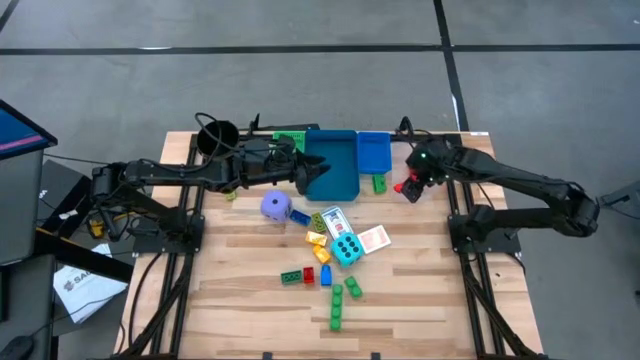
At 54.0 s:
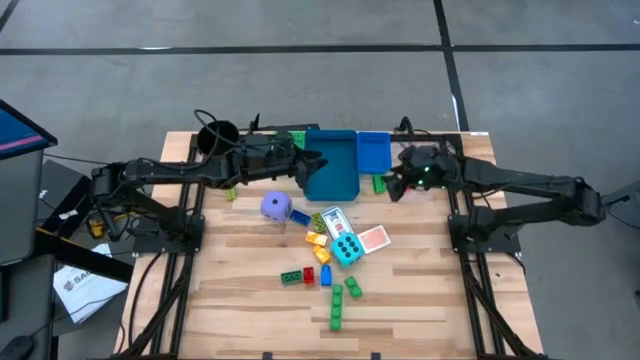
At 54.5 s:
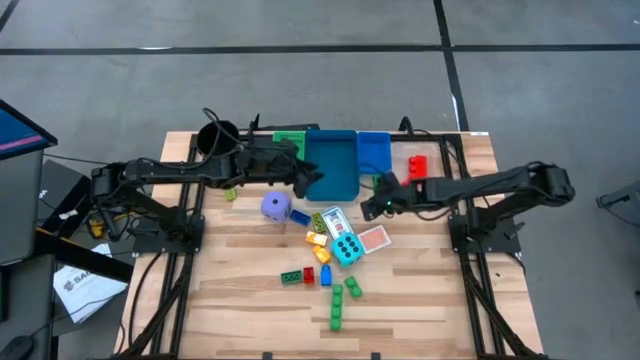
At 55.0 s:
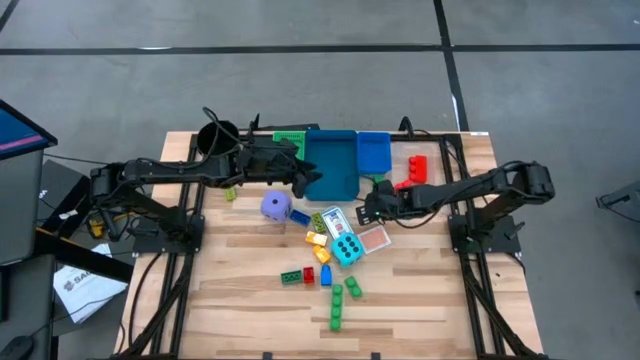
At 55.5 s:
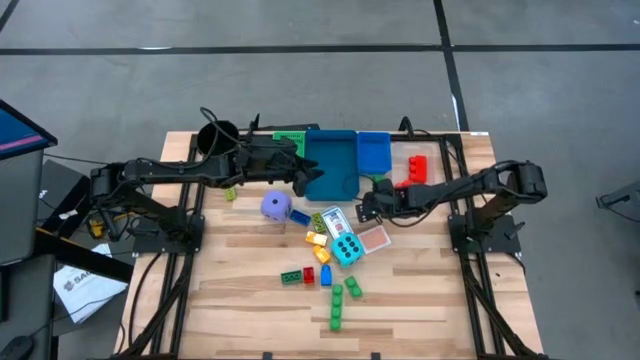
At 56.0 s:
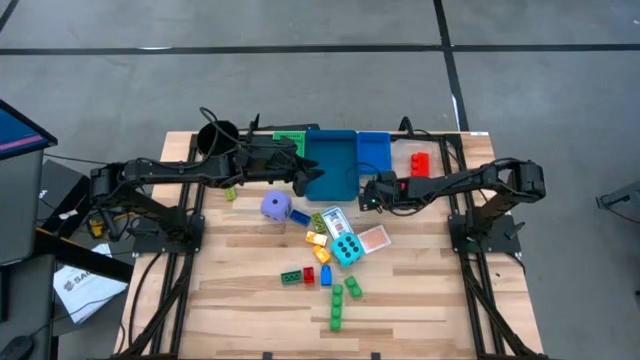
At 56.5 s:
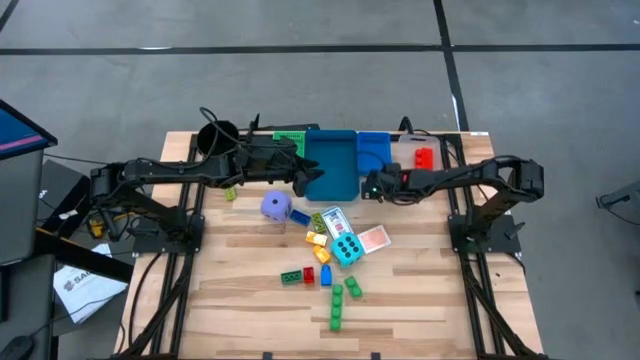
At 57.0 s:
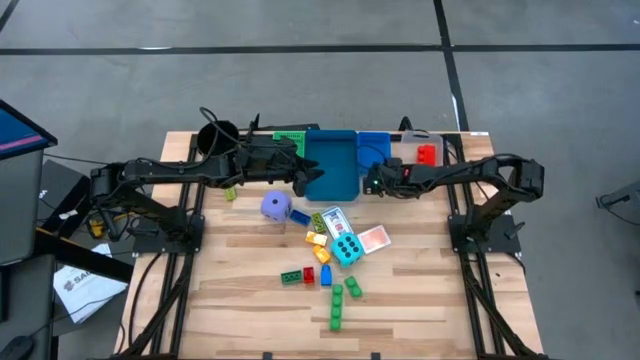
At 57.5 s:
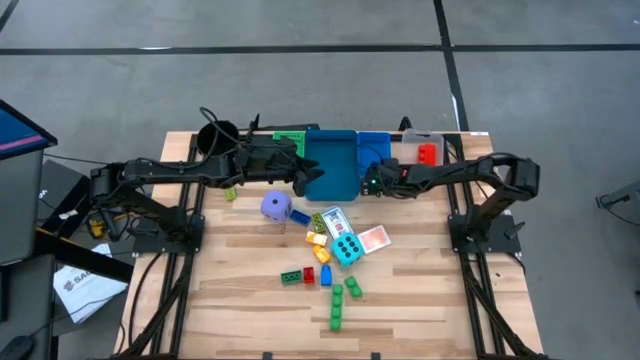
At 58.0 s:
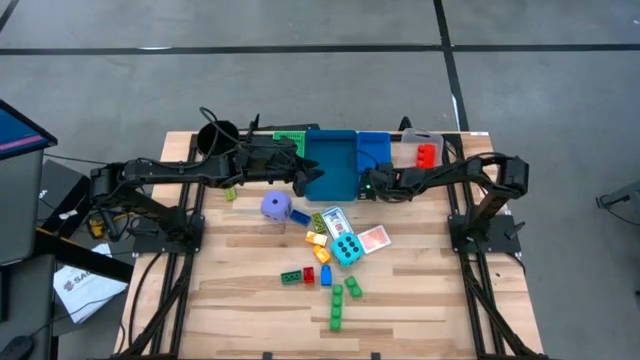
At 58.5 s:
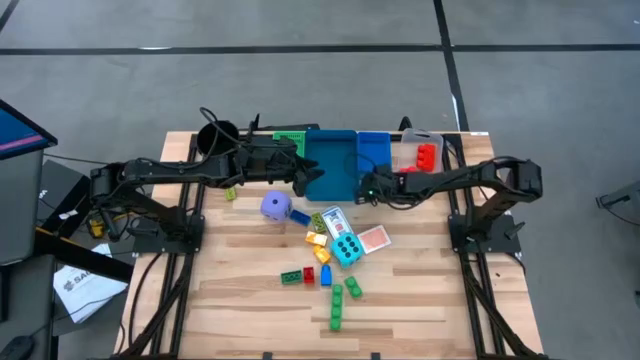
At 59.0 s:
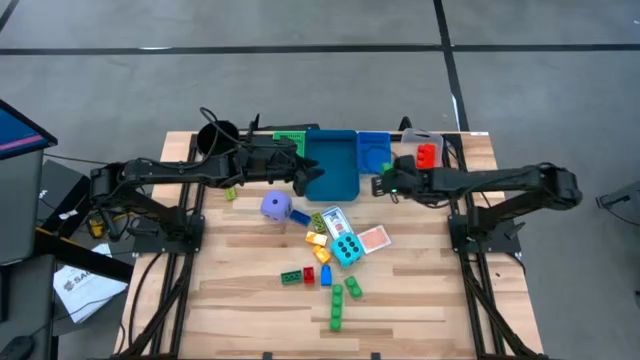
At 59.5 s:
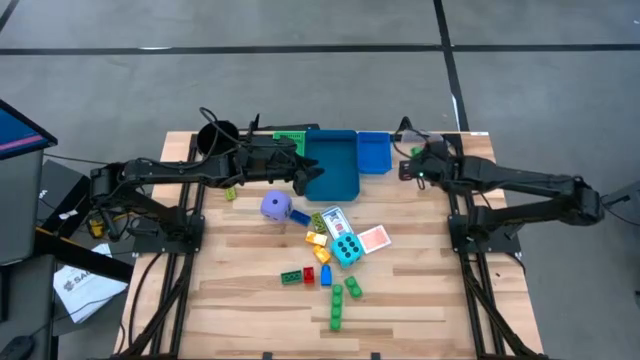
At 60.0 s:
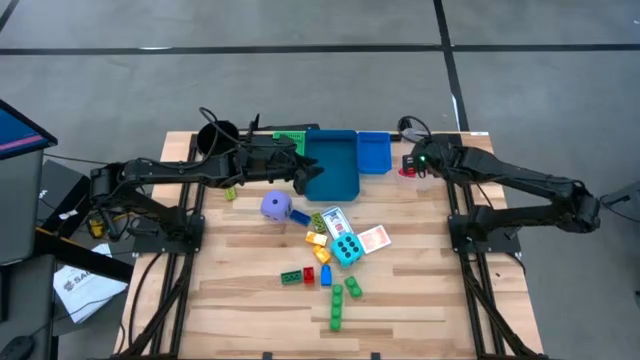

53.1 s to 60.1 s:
Task: Pick & Place Toys
Put the large green game piece into the transparent bin

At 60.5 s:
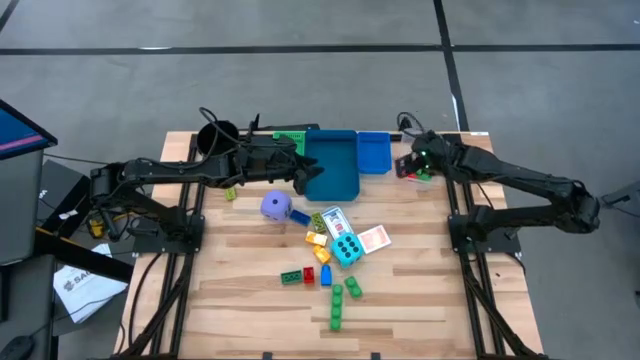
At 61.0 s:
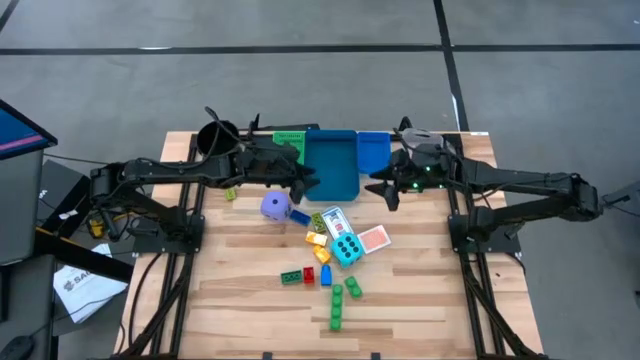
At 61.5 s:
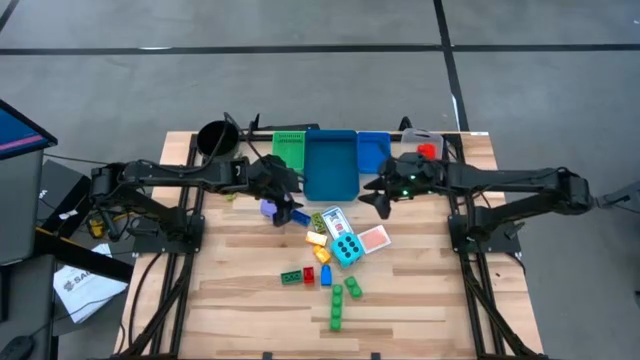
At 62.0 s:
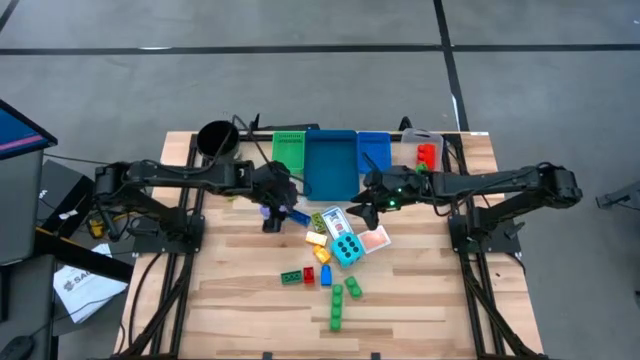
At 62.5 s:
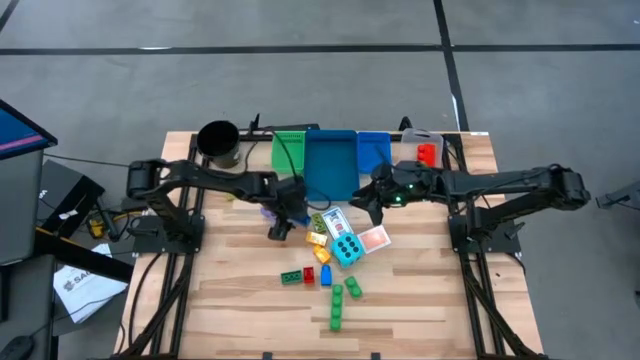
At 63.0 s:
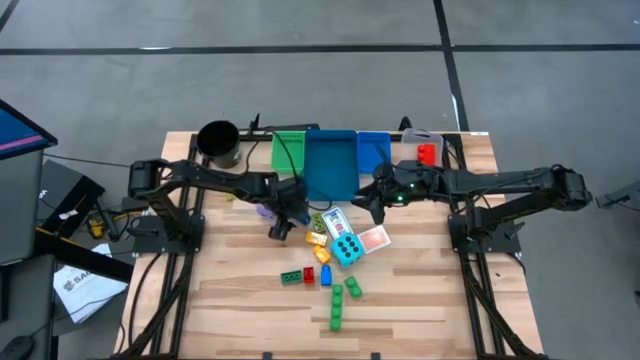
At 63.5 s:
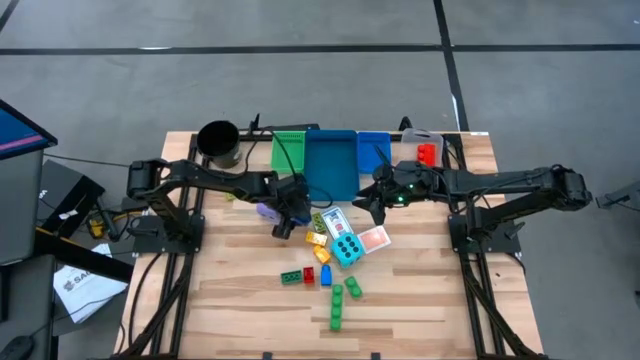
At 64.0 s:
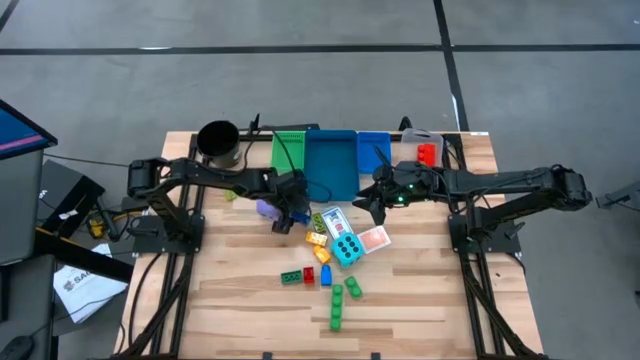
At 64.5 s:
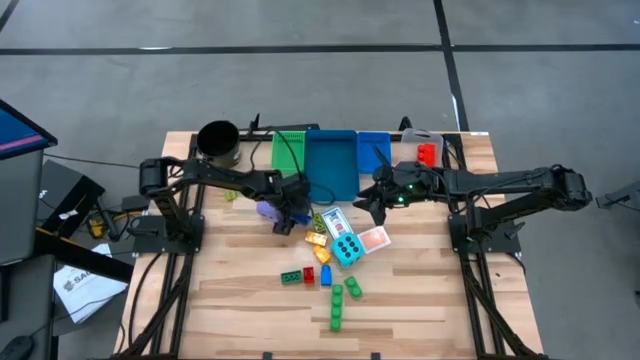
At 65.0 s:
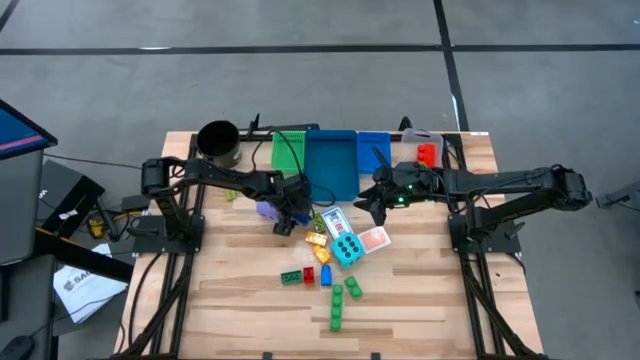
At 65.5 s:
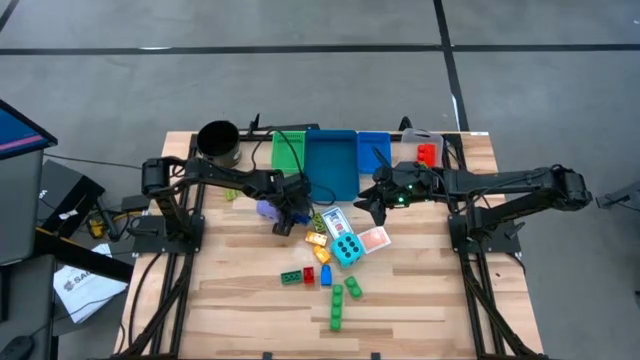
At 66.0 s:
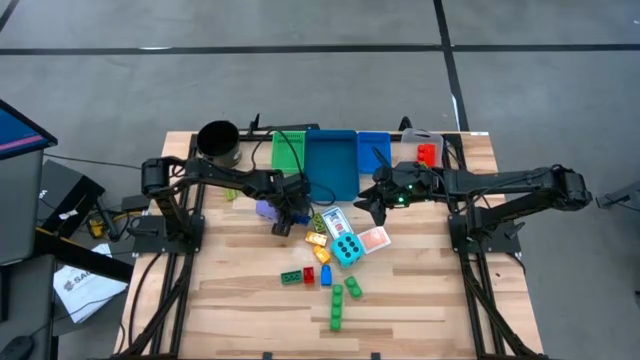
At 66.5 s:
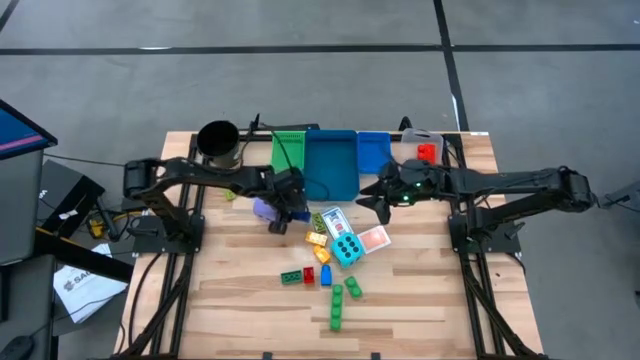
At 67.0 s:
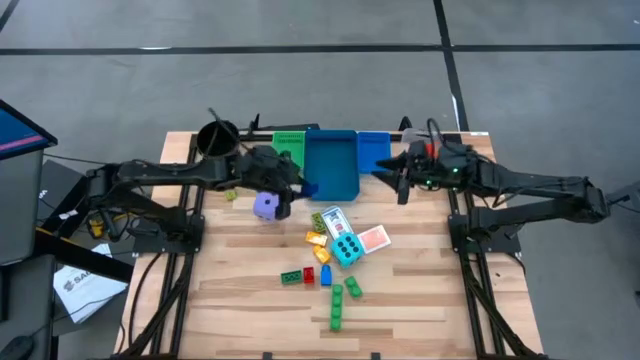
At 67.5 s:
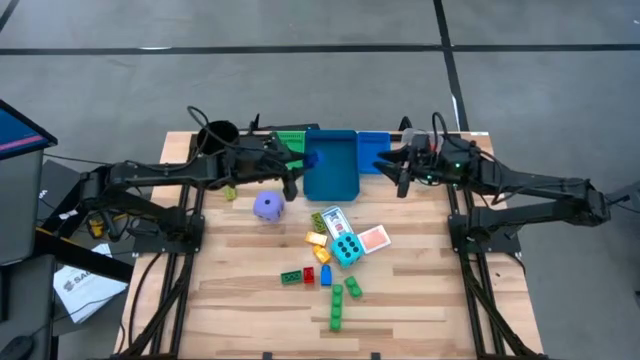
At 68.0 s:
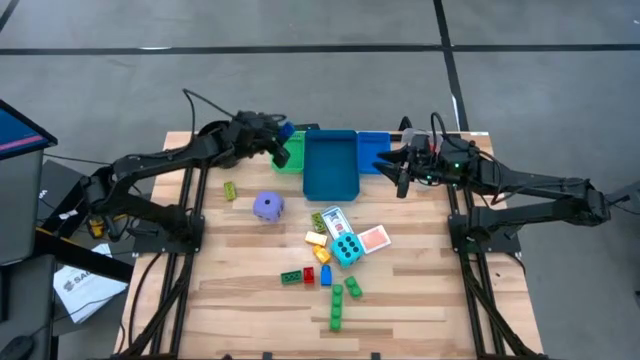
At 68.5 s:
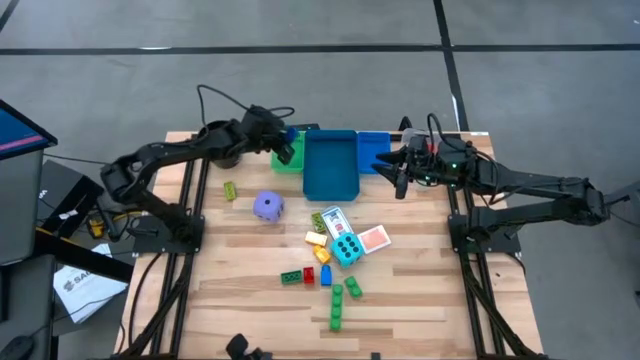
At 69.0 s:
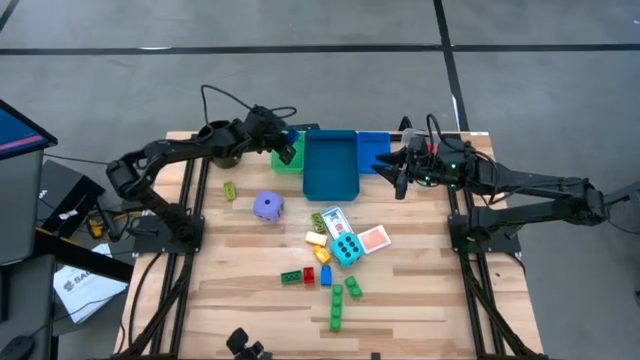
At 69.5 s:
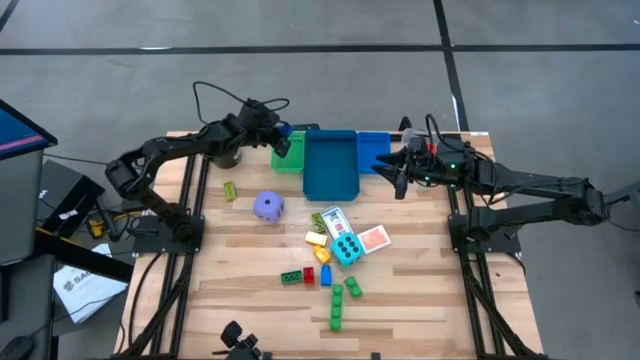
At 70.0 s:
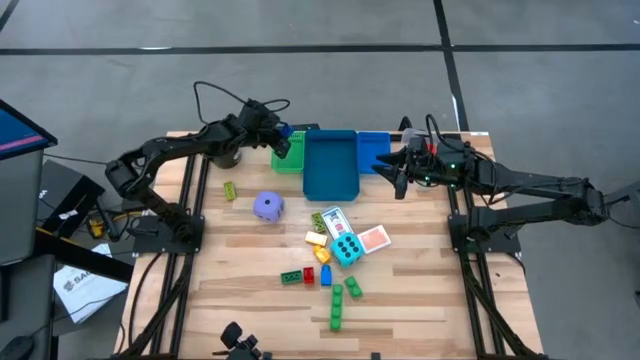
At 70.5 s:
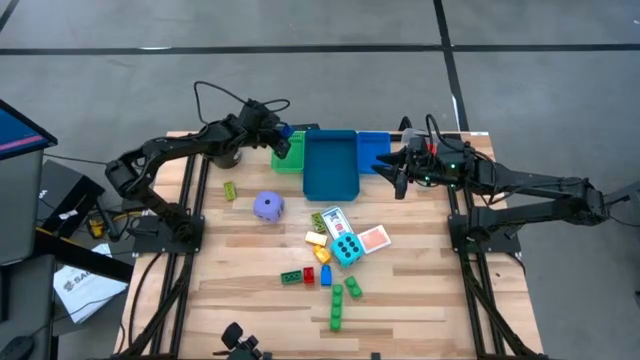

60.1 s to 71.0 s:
Put the small blue game piece into the green bin

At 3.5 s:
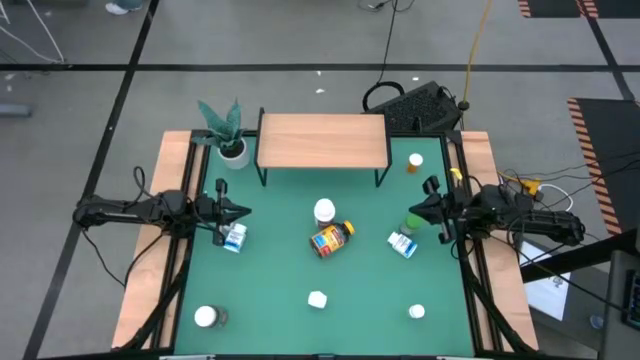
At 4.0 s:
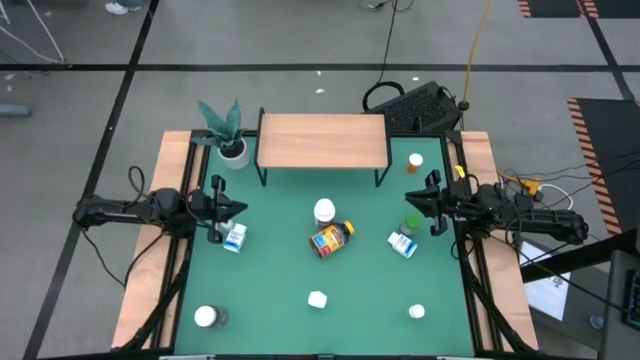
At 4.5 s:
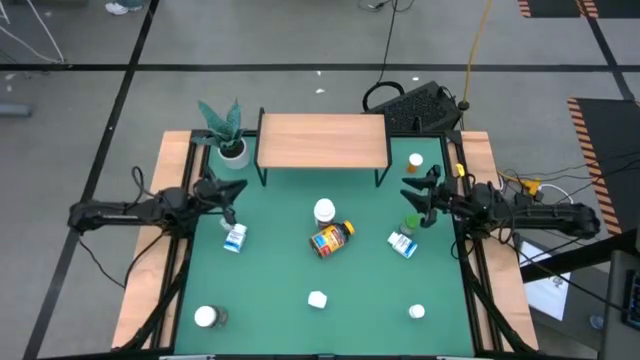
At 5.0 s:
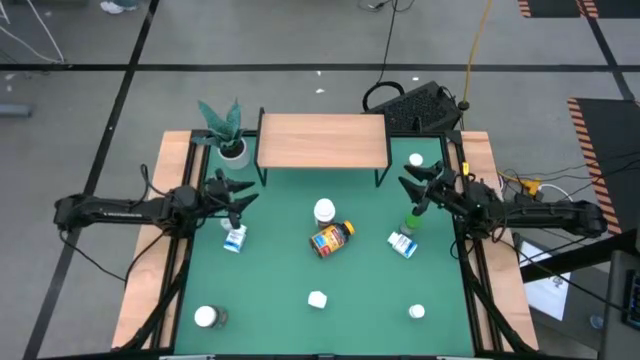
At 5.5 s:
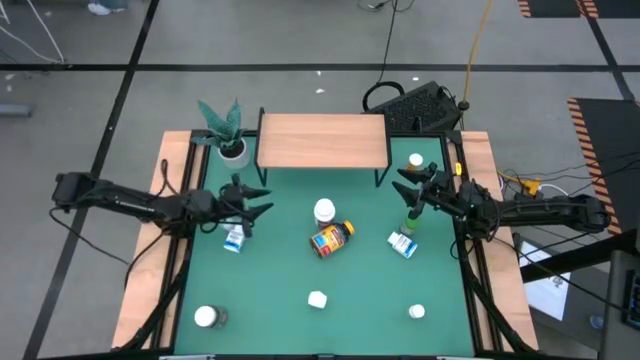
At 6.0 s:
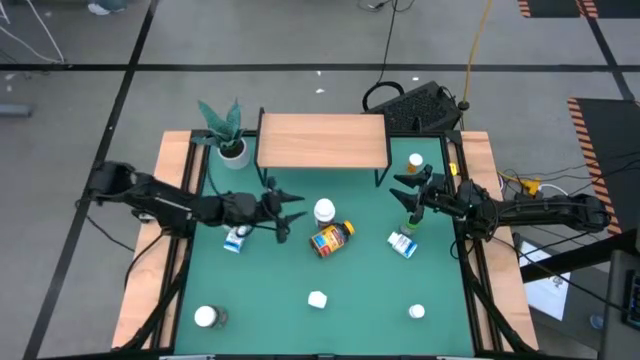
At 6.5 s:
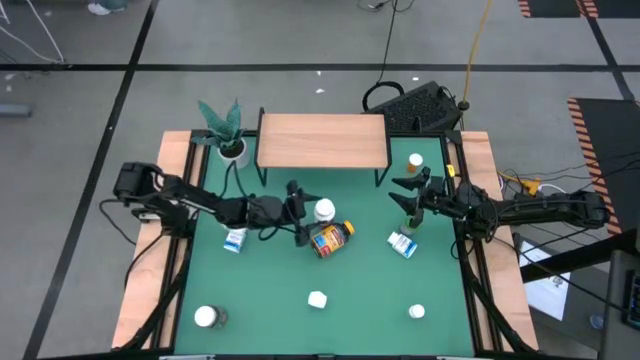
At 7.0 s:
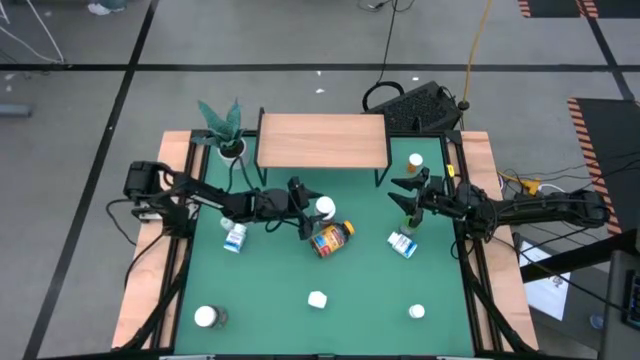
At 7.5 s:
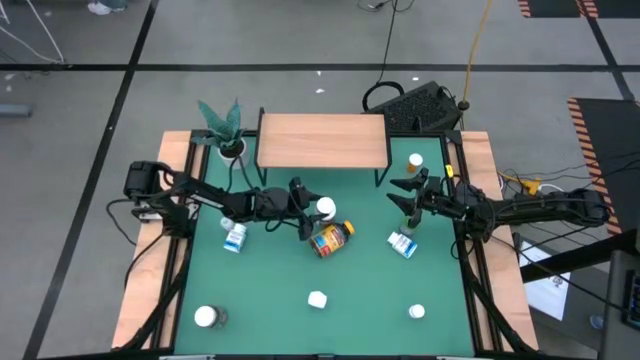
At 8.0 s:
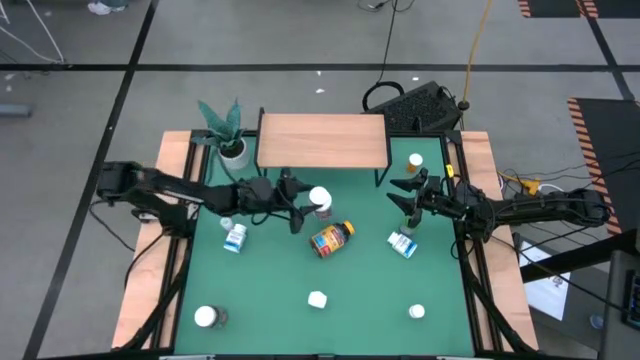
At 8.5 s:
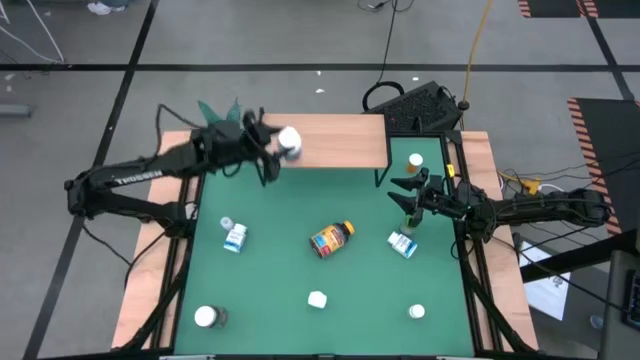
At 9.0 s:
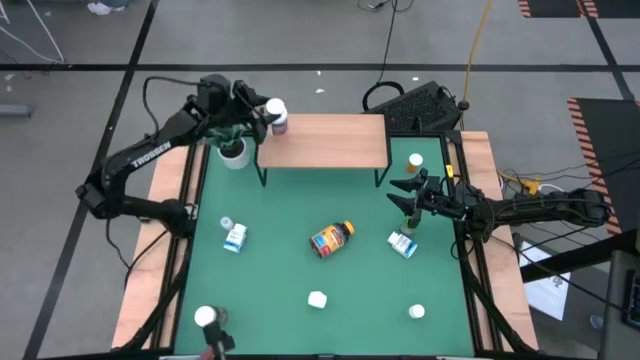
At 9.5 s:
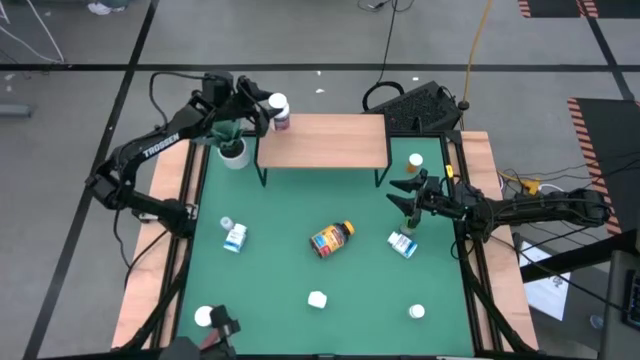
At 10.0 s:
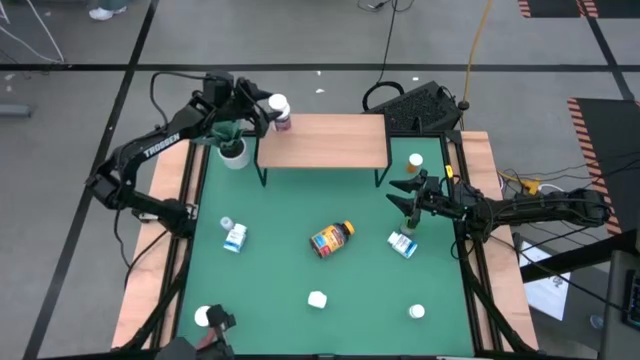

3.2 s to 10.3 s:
Task: Pick and place medicine bottles onto shelf by color
Put the white purple pill bottle on the shelf
